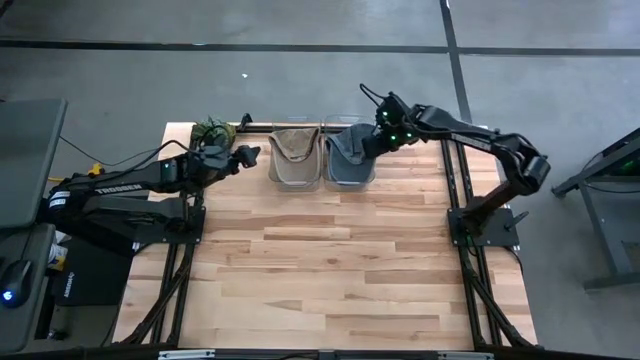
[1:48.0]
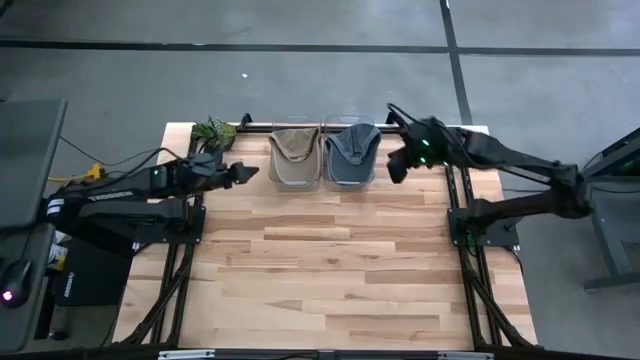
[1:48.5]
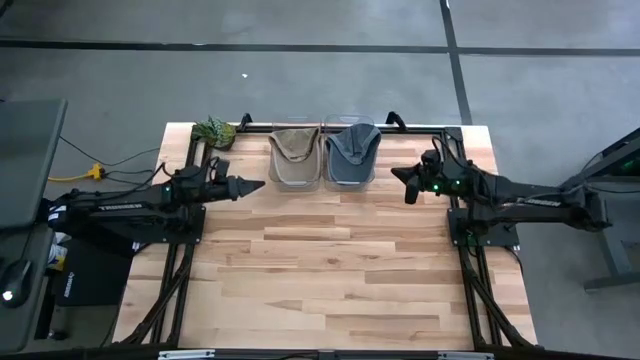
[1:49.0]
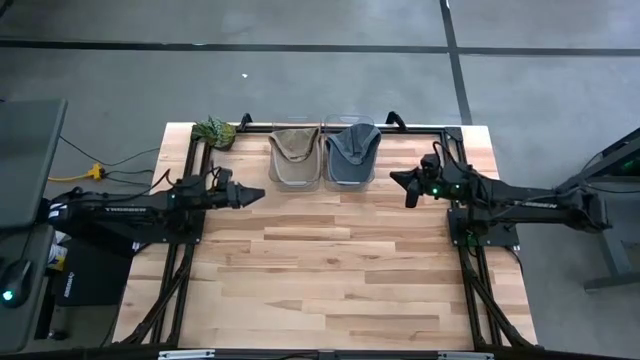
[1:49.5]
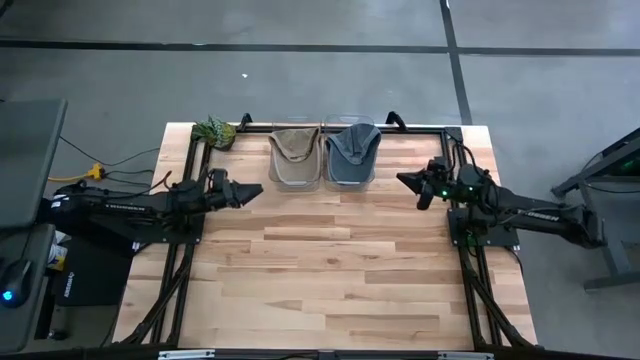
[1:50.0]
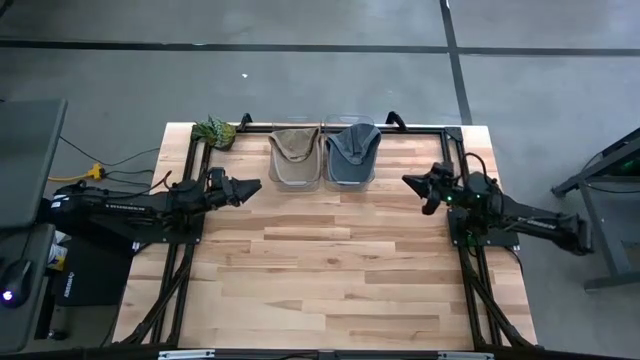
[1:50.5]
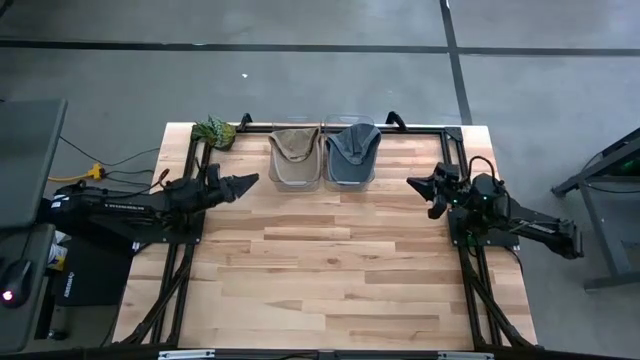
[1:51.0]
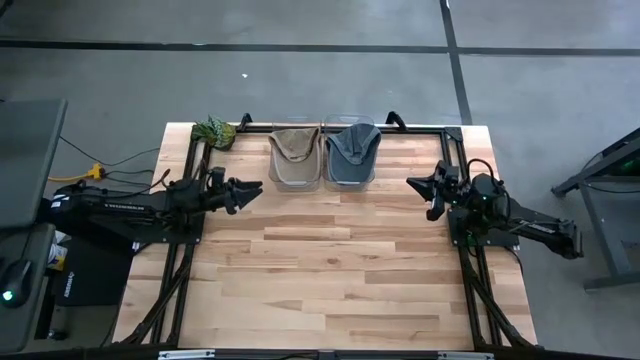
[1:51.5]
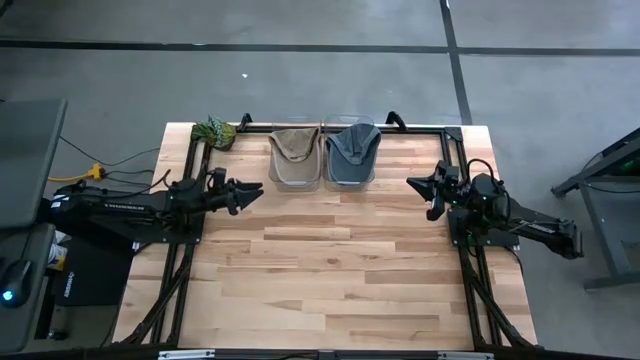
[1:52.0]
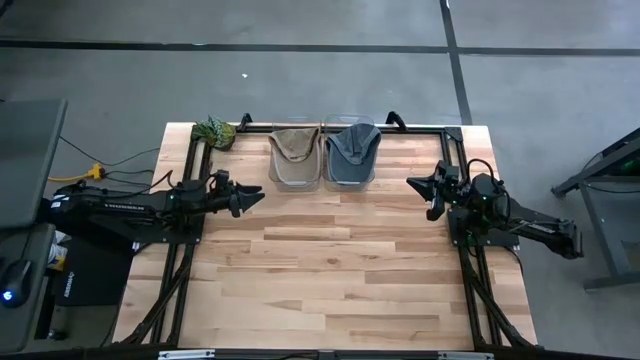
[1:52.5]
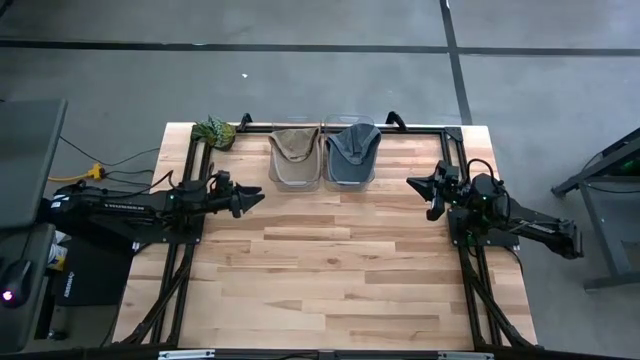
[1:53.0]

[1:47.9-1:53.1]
Task: Pick & Place hat
Return to Home Position

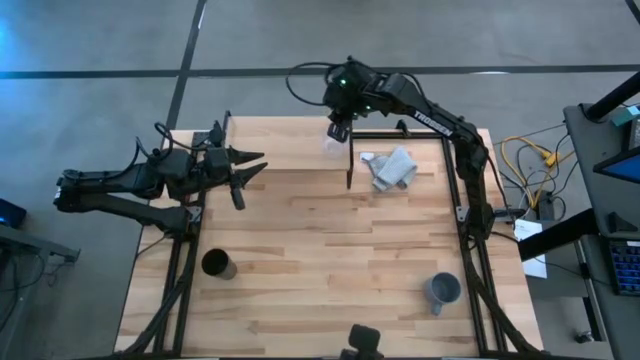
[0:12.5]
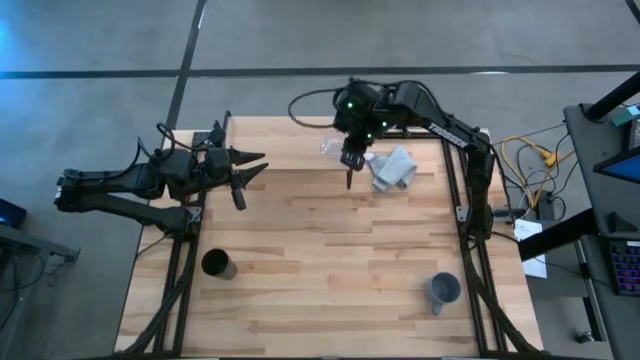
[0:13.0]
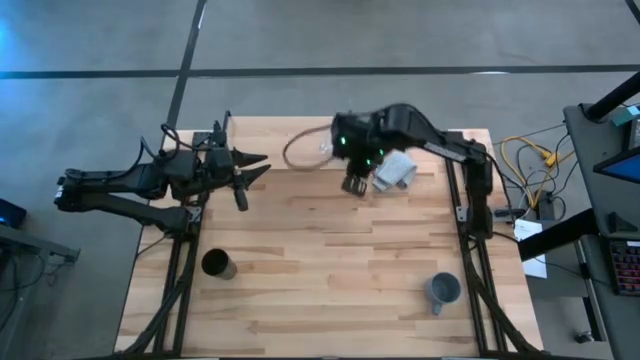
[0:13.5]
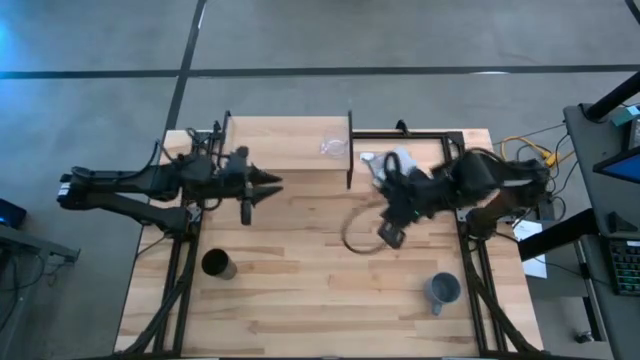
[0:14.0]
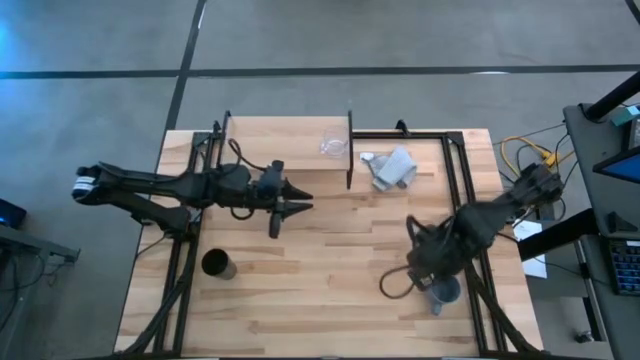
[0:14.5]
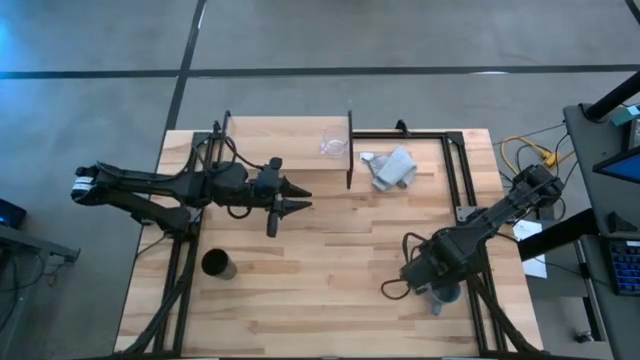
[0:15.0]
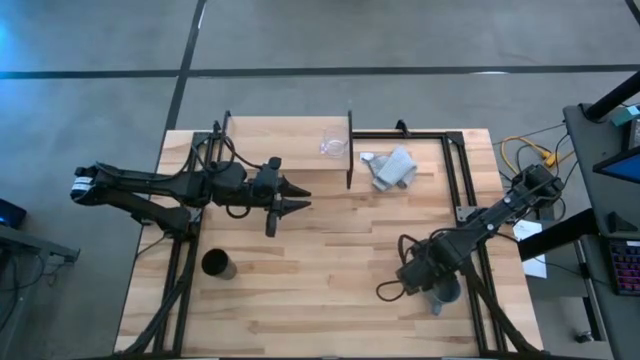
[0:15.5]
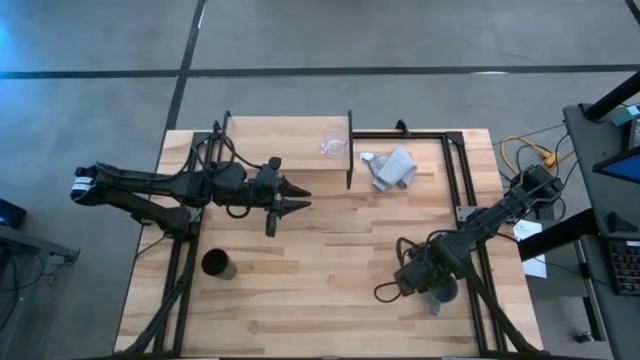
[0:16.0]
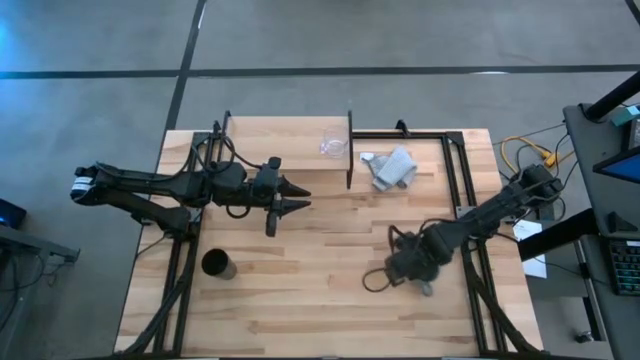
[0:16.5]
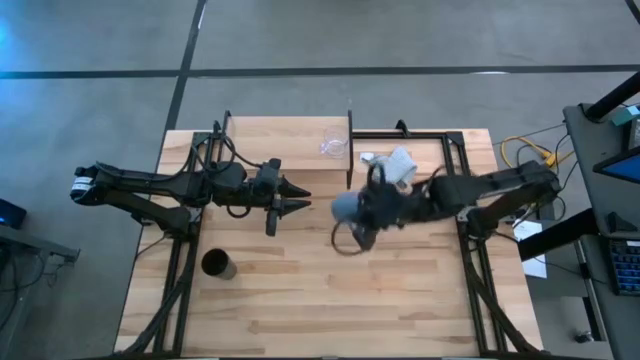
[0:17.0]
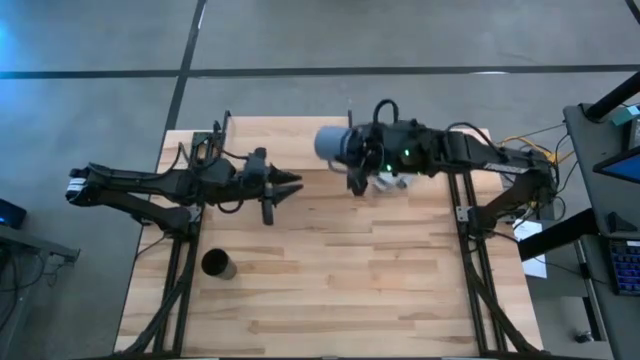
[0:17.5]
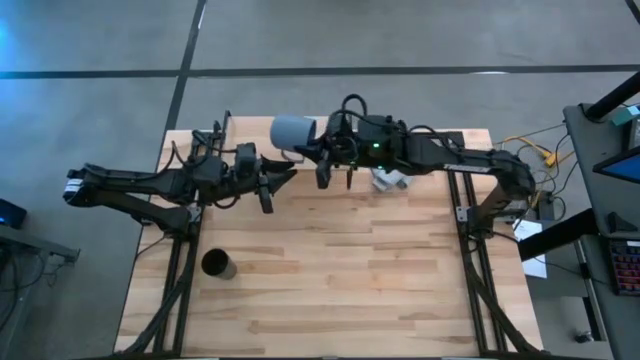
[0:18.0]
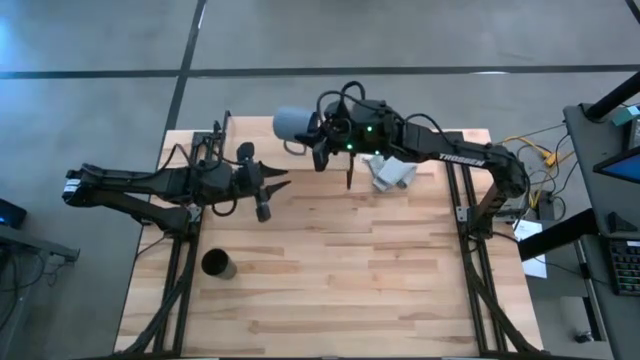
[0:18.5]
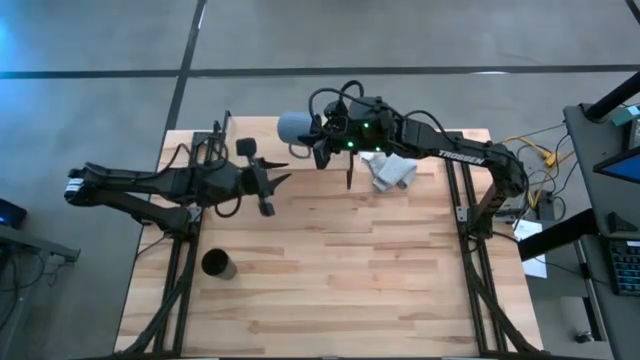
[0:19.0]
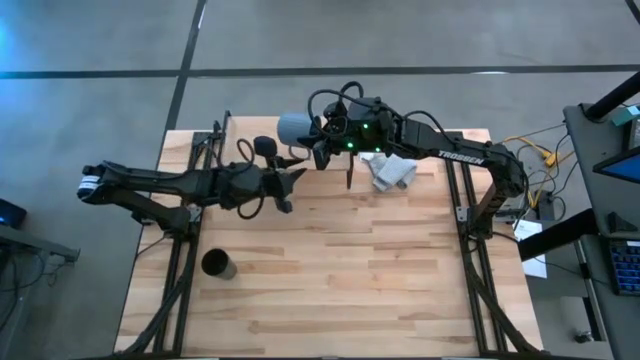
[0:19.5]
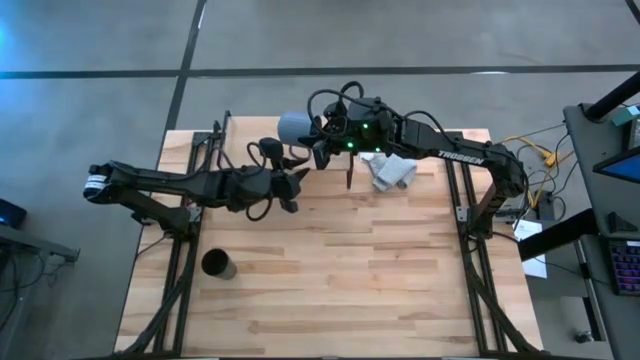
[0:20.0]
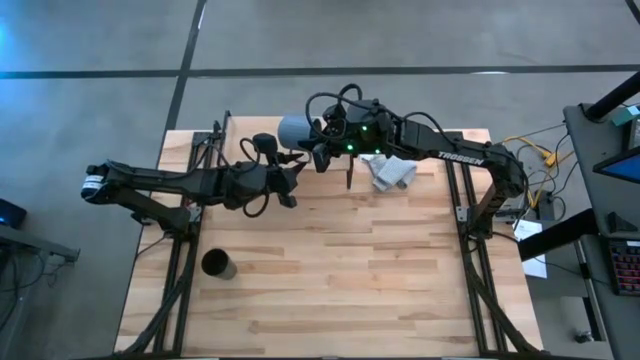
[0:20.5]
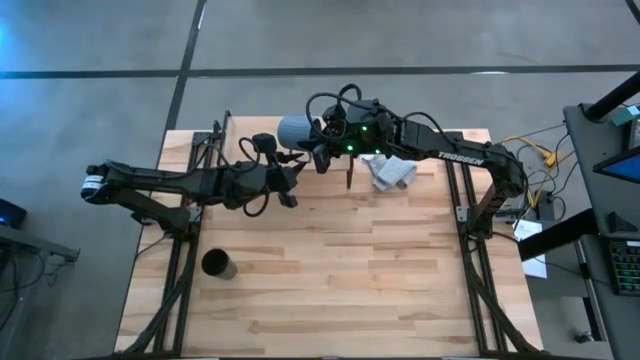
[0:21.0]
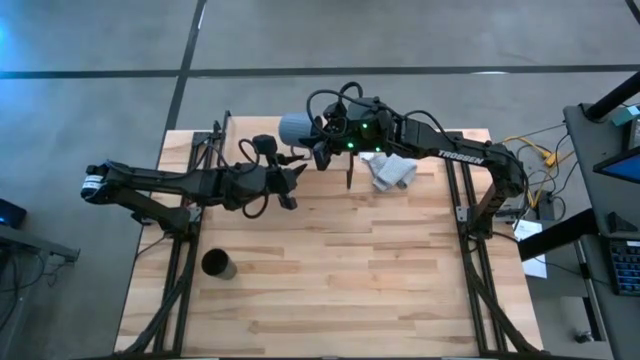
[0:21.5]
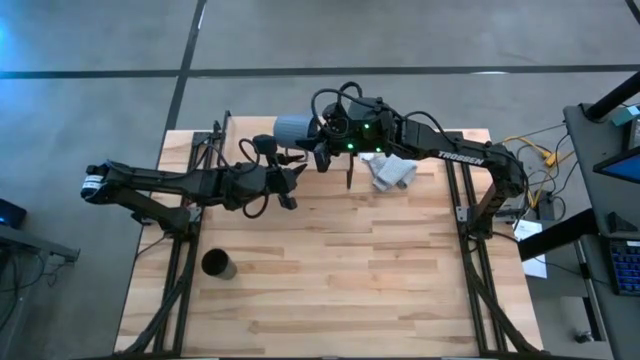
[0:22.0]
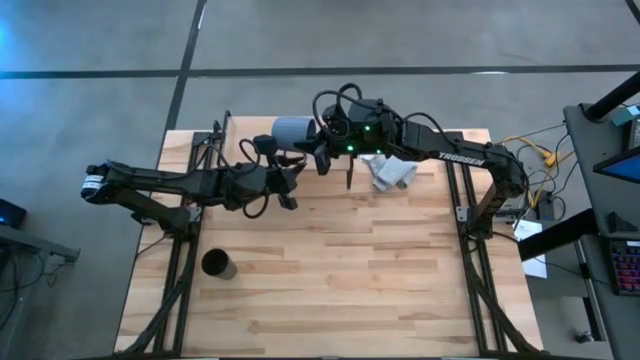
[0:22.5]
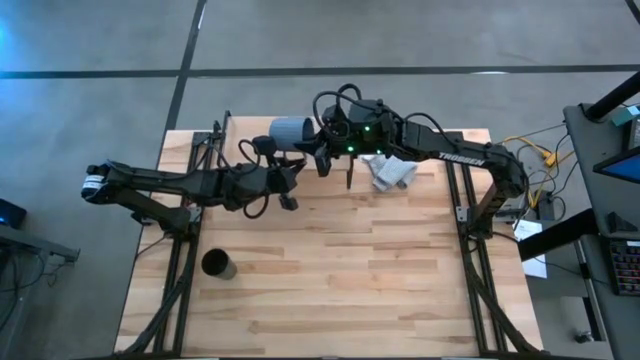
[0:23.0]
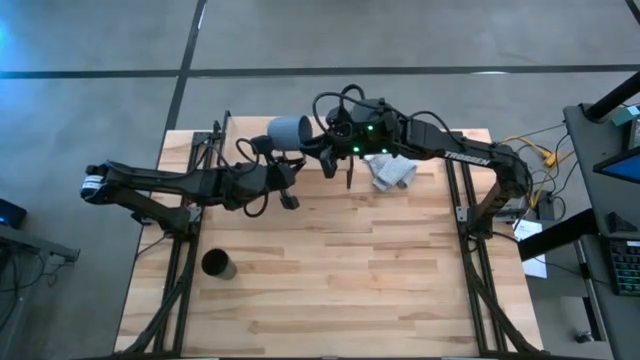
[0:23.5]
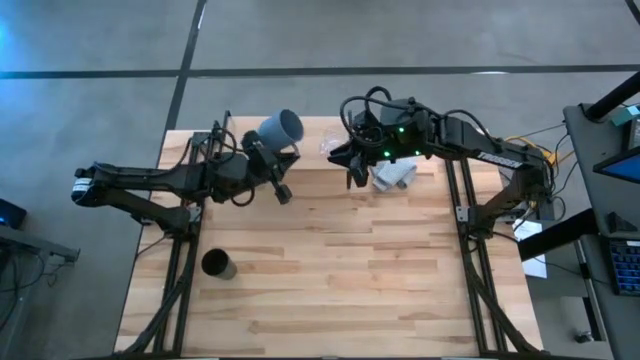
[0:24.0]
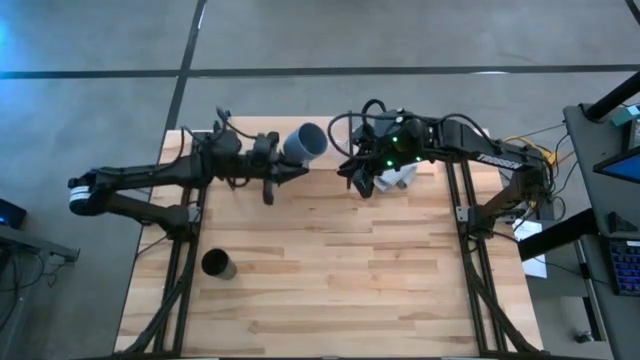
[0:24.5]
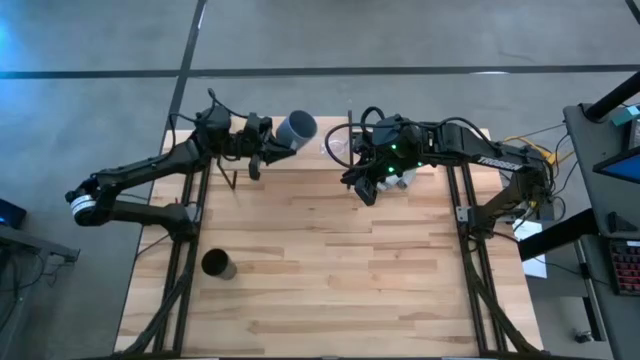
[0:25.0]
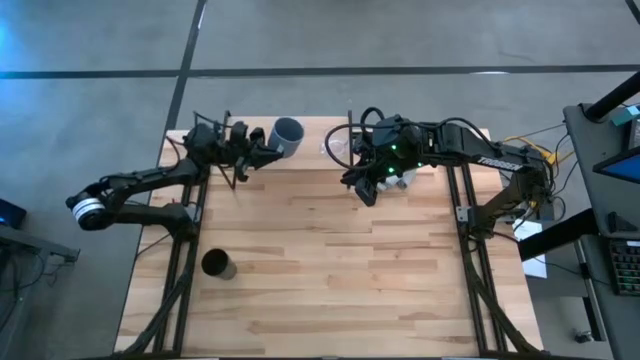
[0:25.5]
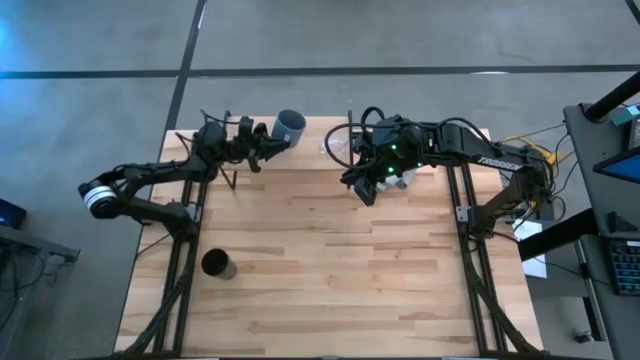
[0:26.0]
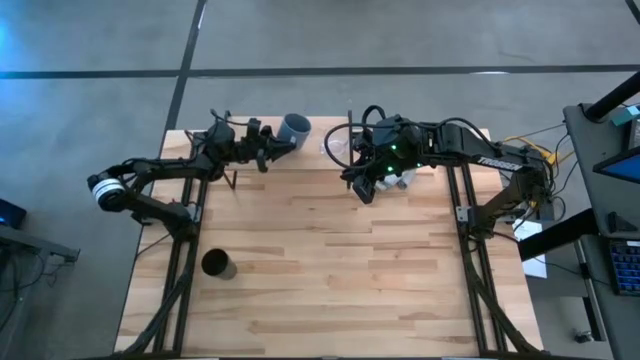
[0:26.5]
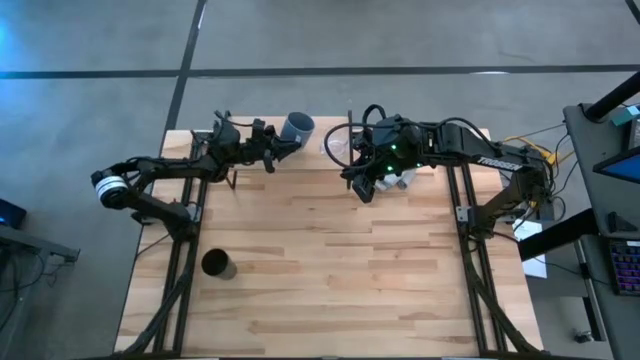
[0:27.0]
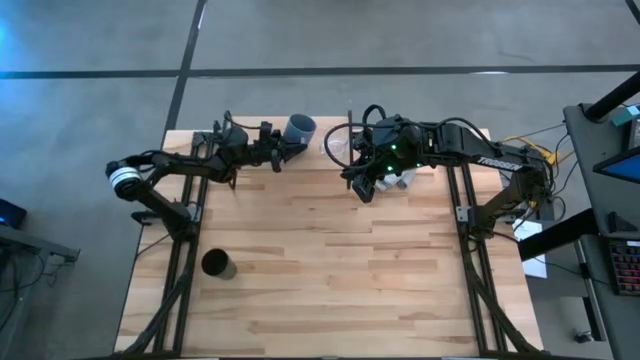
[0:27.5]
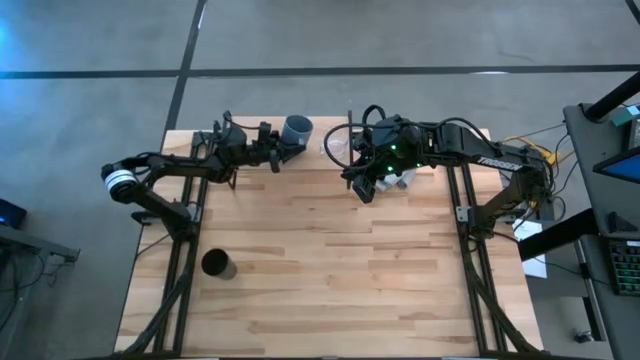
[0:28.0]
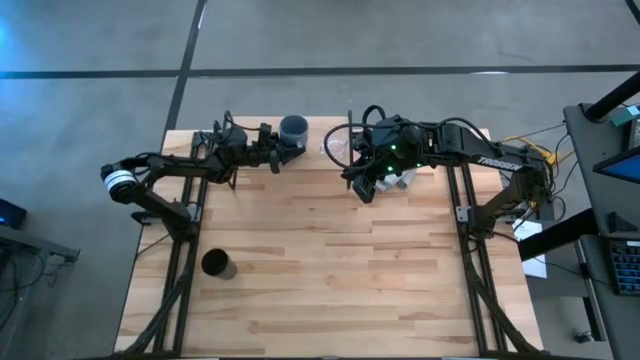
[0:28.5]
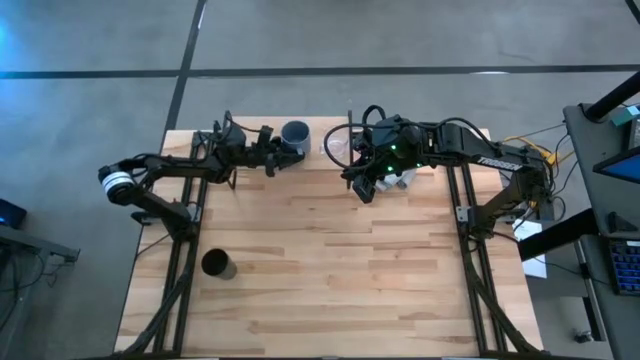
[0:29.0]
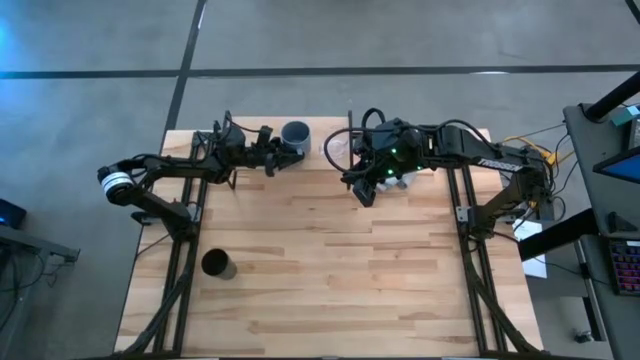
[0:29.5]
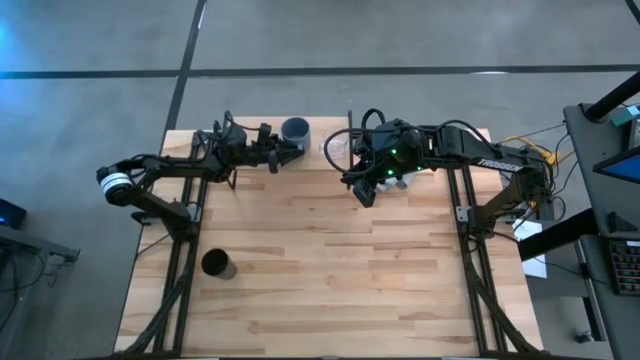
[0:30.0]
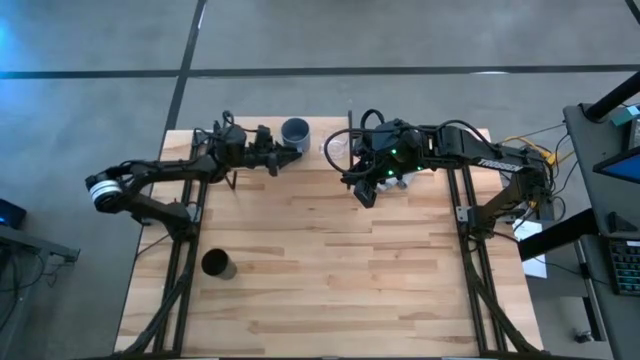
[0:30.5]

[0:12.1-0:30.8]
Task: Stack small to large cups/mugs on shelf
Put the gray mug on the shelf
